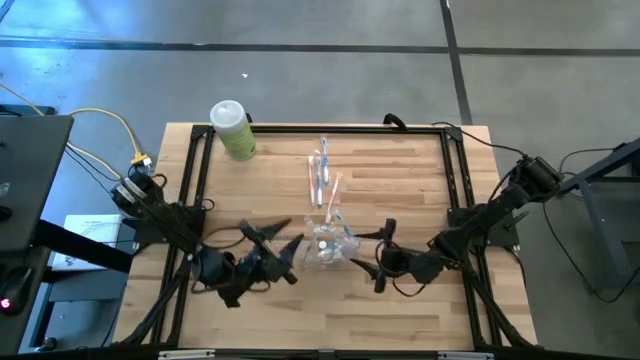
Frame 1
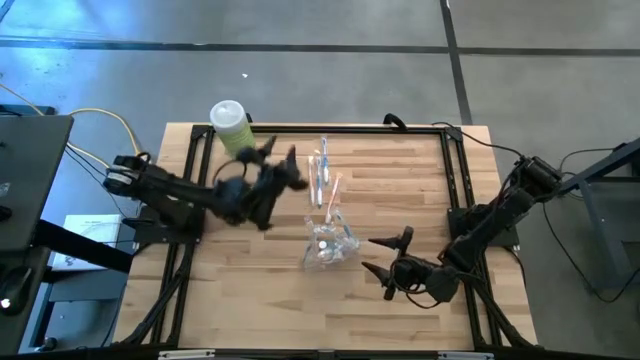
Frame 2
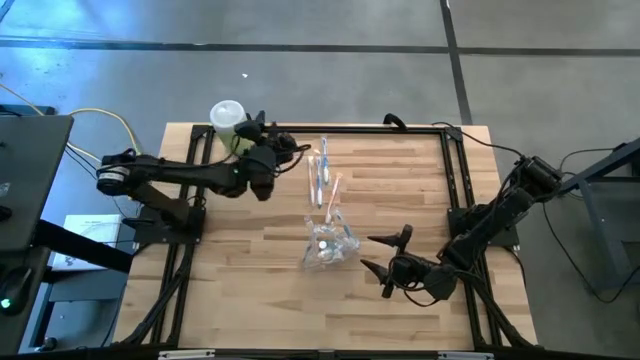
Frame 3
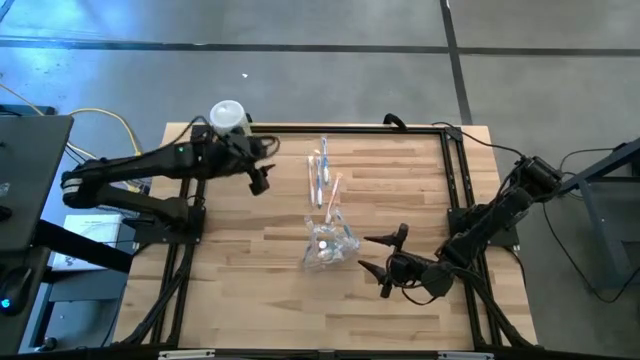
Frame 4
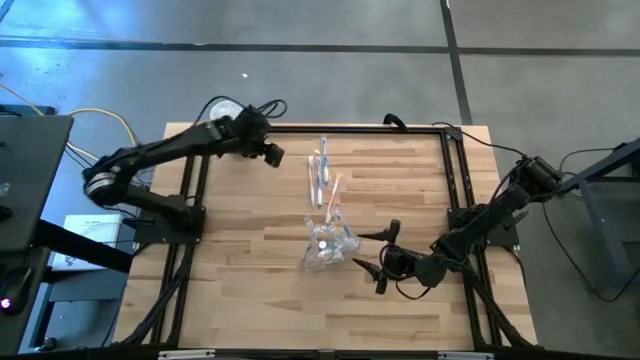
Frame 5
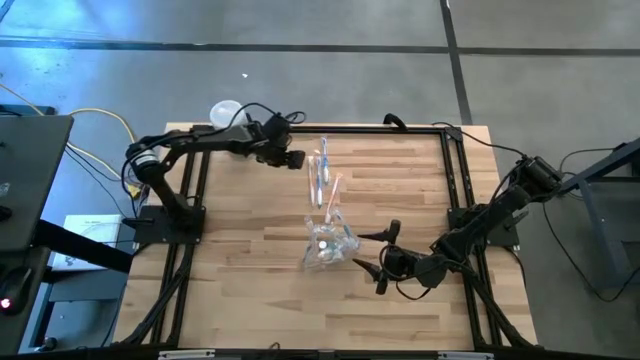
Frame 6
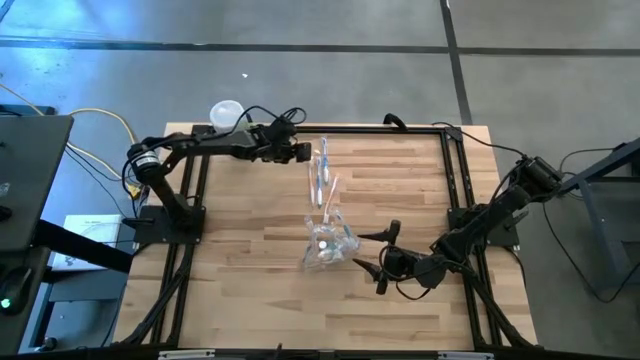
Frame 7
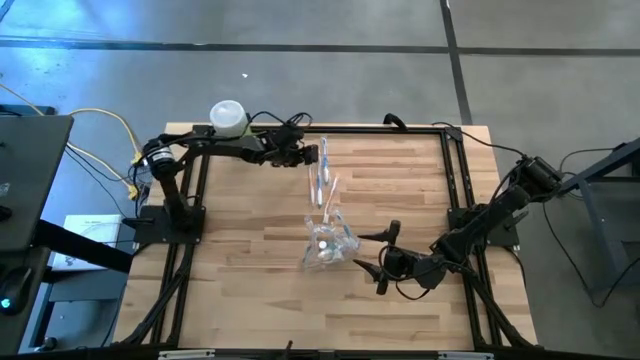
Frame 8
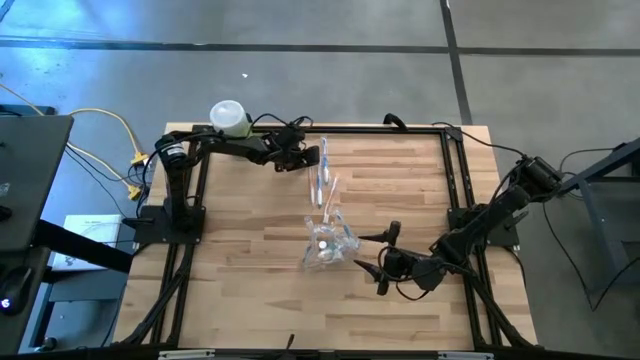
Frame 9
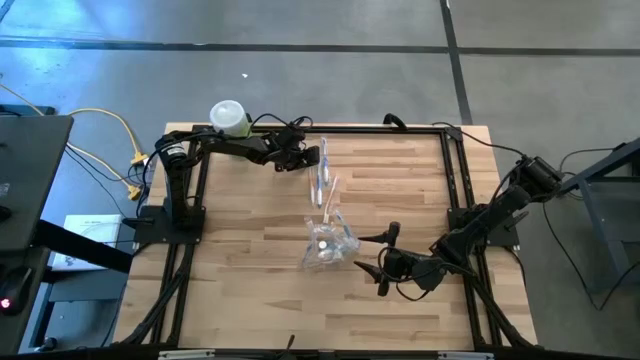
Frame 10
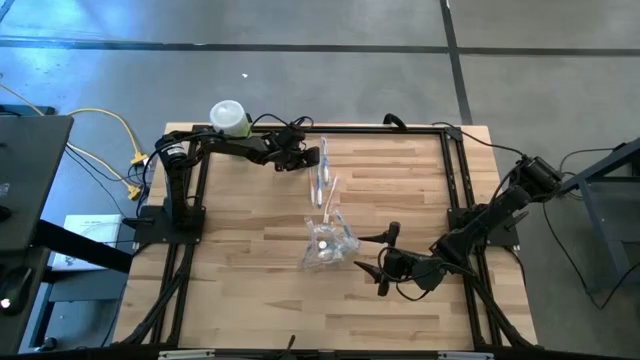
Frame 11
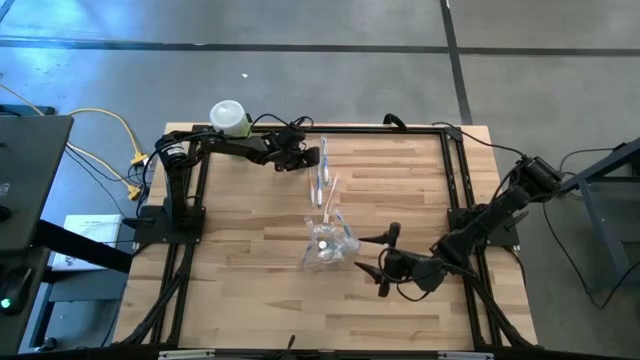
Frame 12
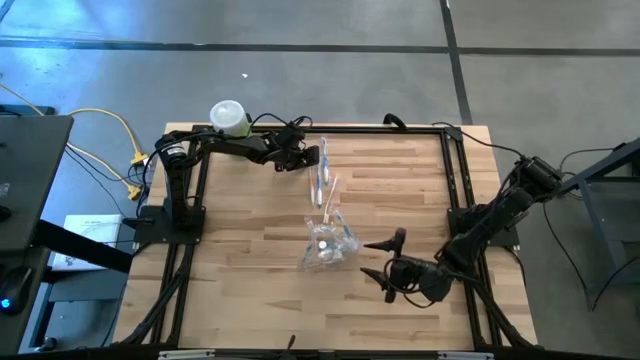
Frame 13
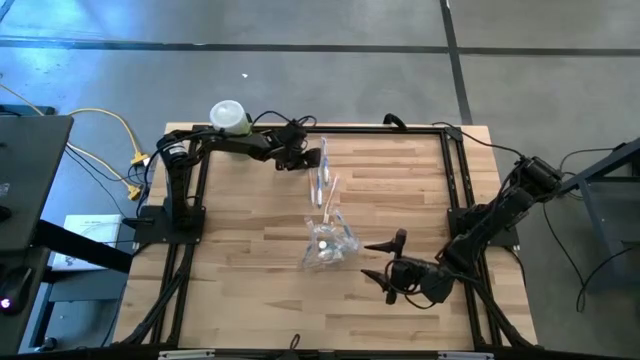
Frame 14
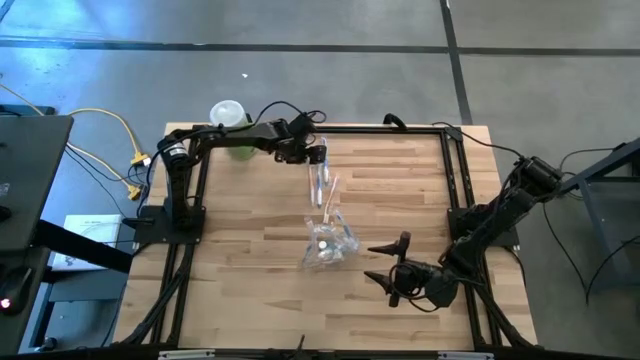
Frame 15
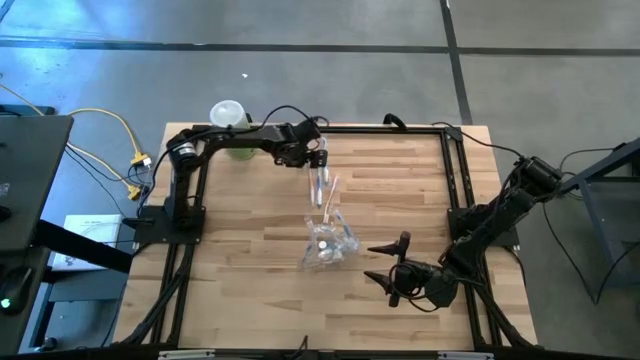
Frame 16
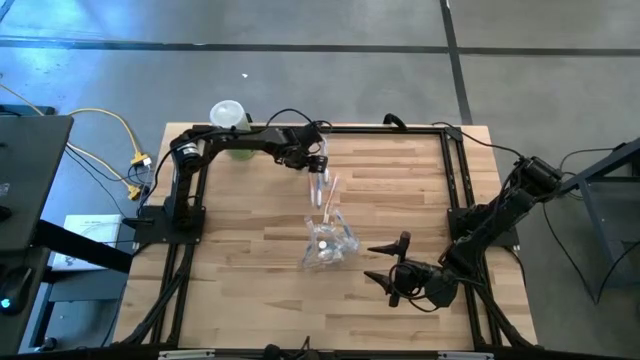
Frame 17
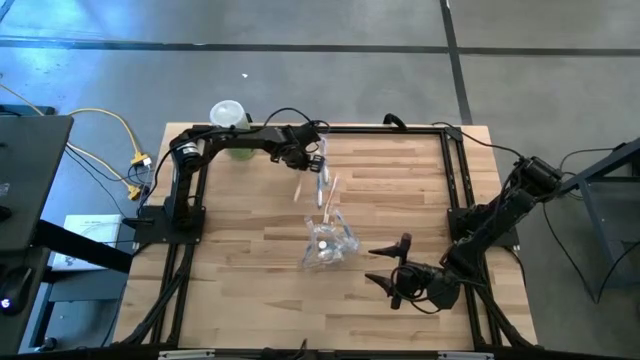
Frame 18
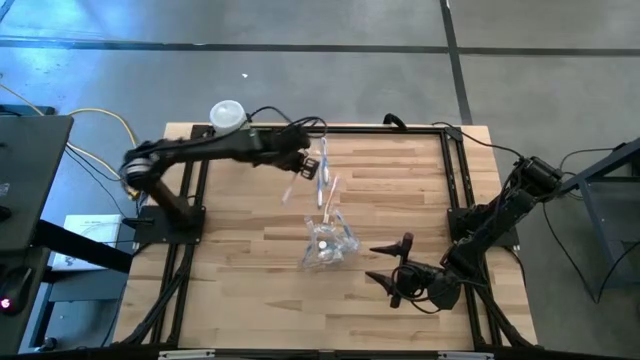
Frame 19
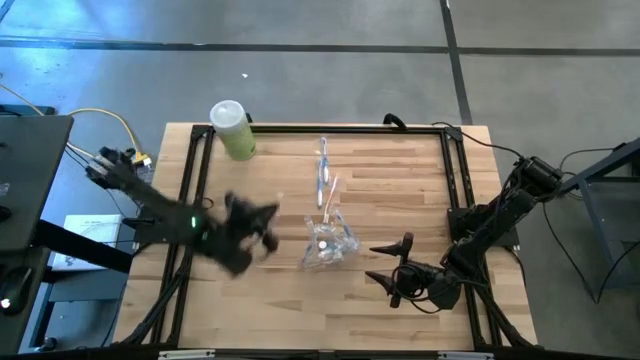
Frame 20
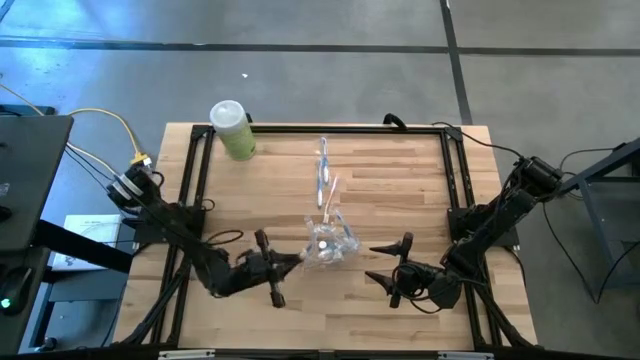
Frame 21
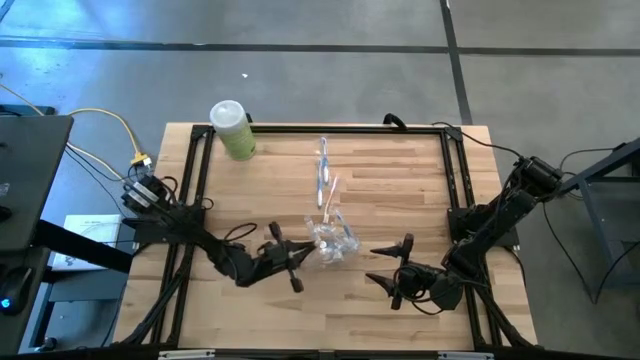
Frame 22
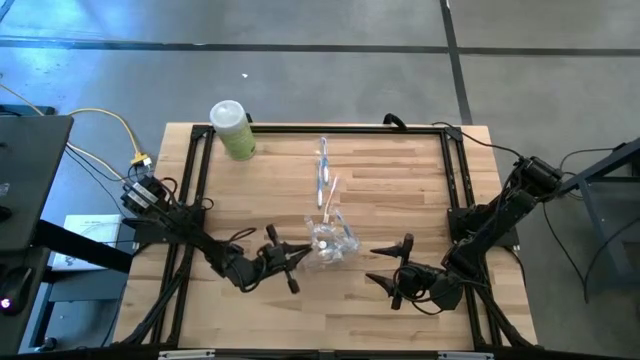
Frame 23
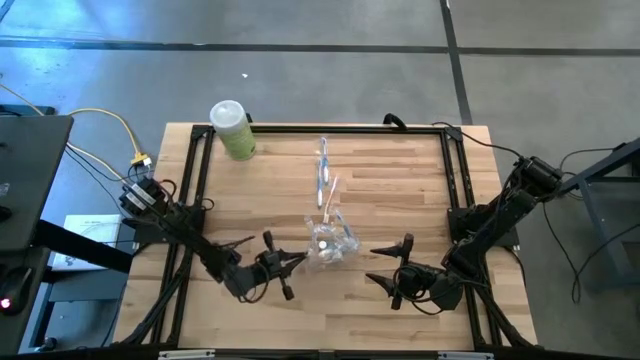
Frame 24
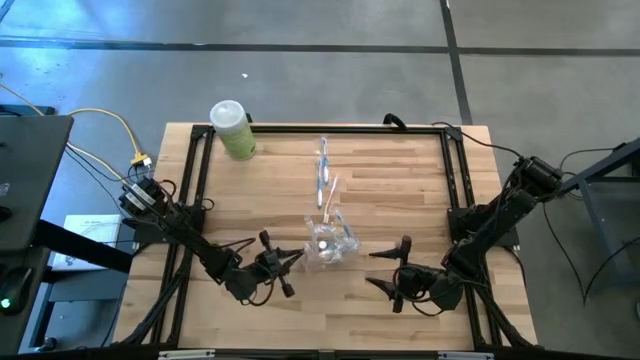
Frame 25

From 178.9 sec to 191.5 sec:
Task: Pick & Place toothbrushing station
Put the orange toothbrush into the transparent organizer

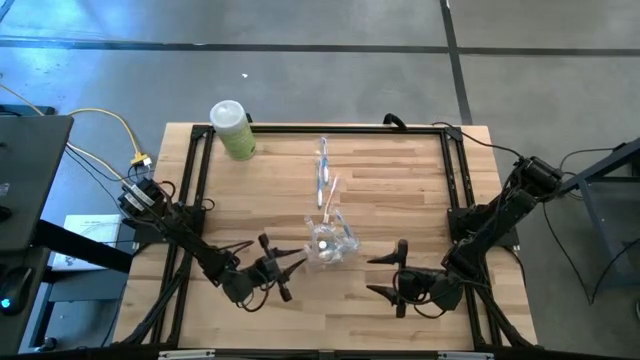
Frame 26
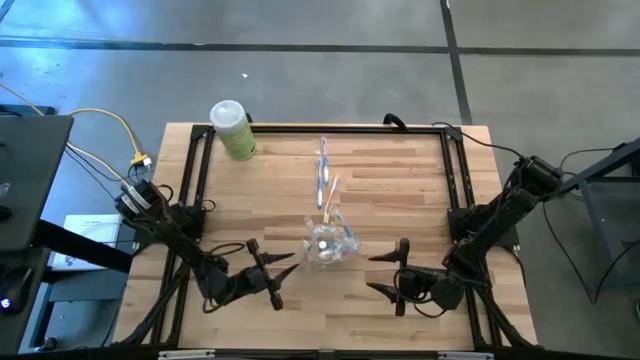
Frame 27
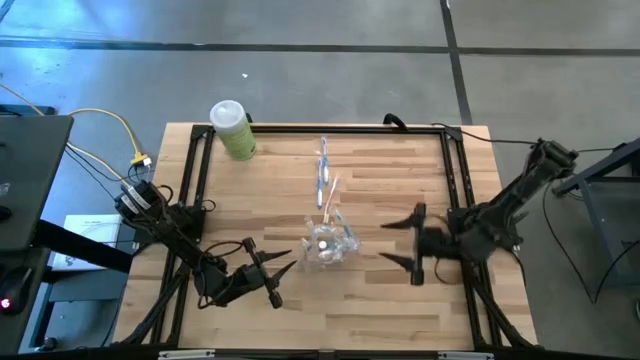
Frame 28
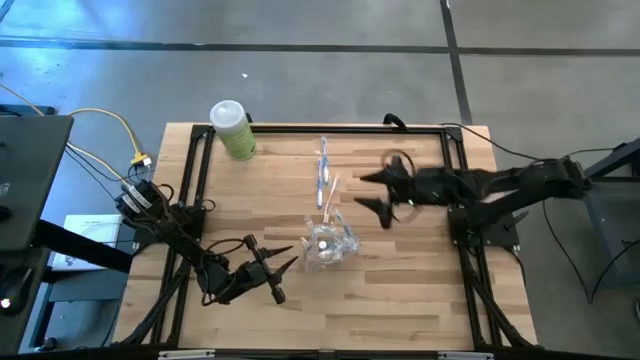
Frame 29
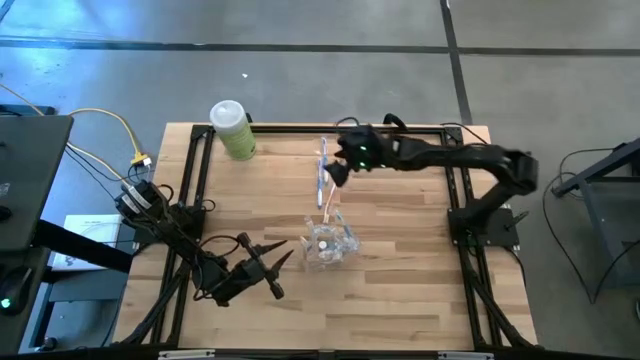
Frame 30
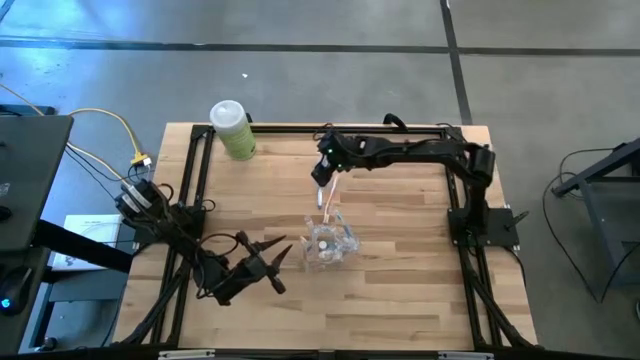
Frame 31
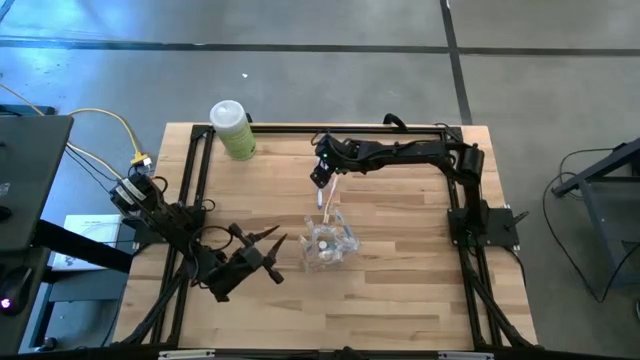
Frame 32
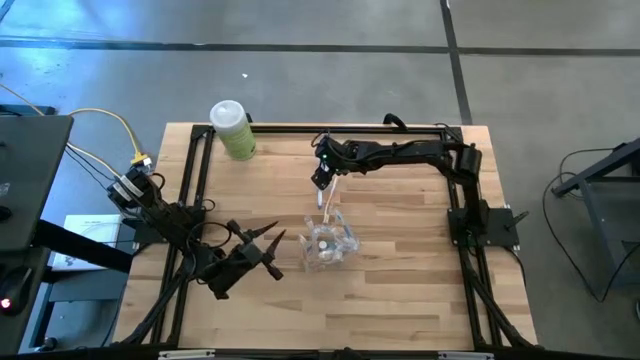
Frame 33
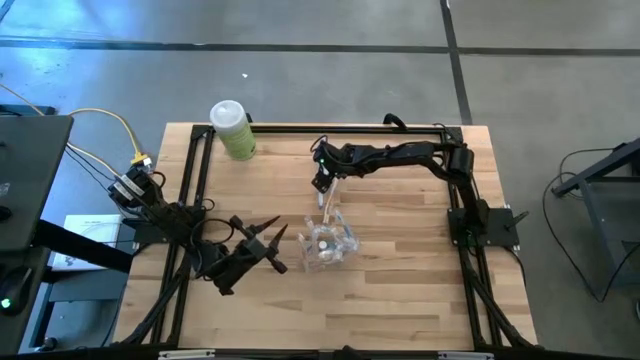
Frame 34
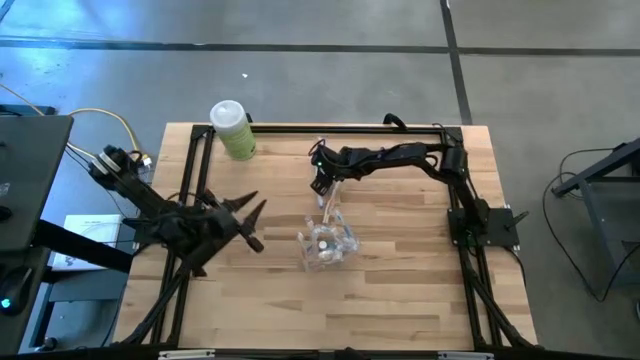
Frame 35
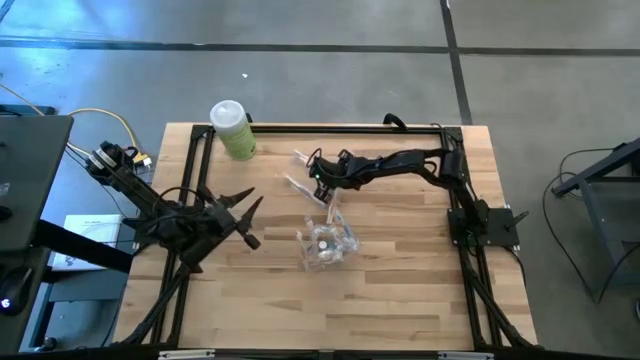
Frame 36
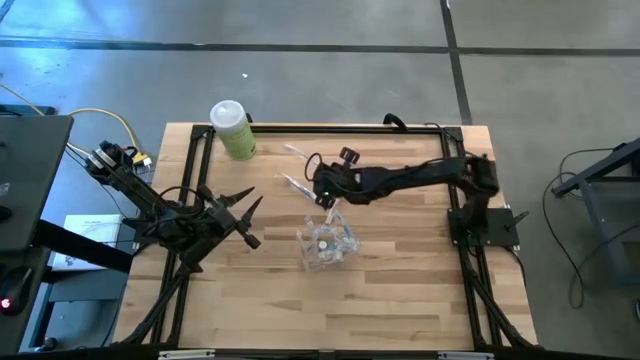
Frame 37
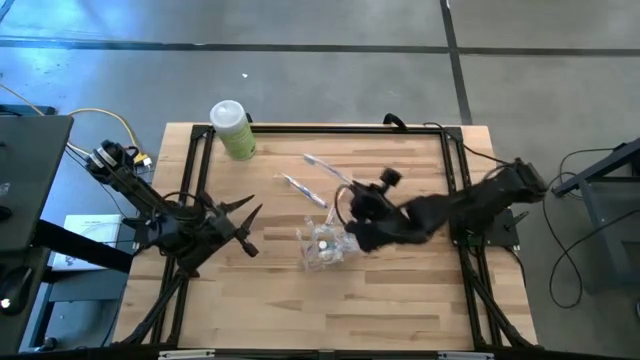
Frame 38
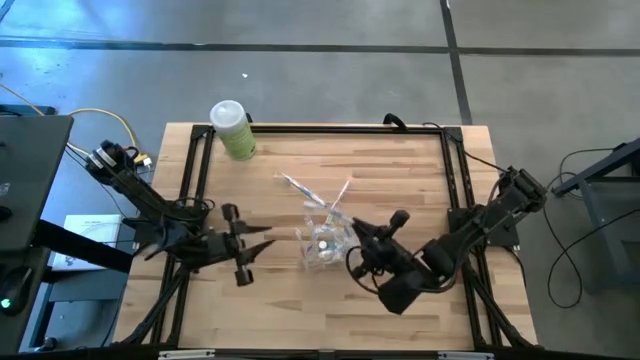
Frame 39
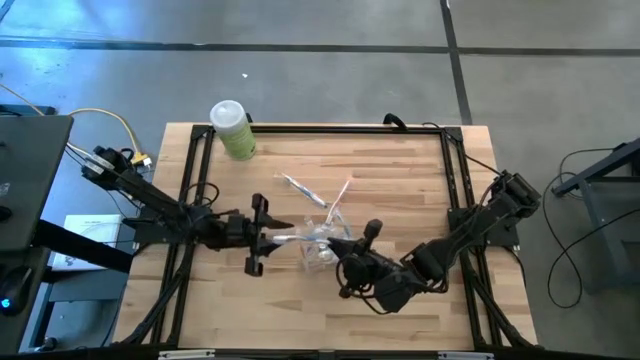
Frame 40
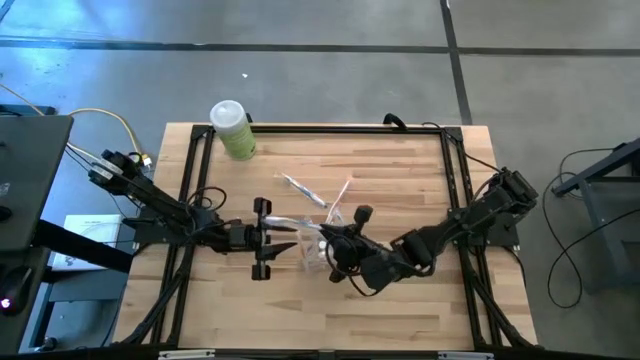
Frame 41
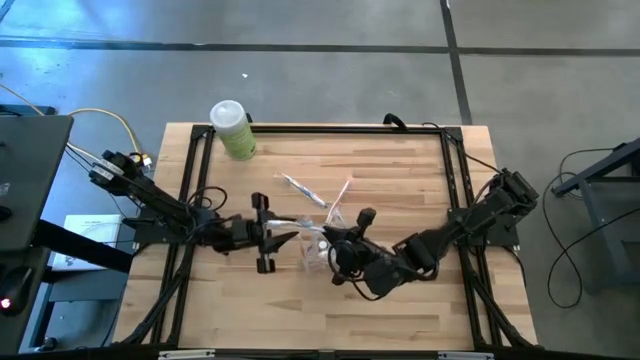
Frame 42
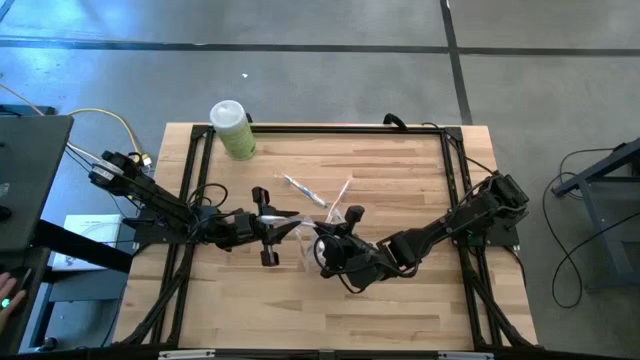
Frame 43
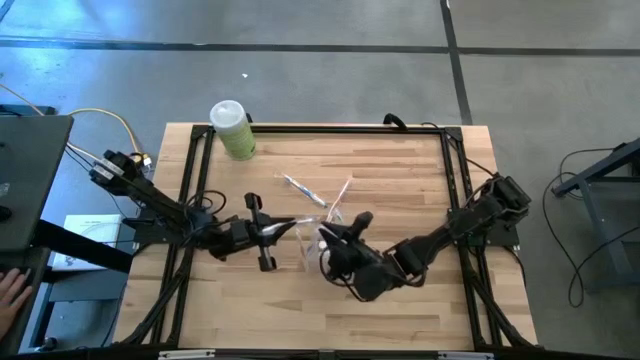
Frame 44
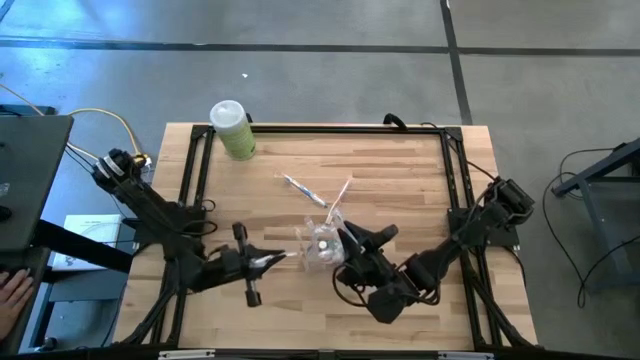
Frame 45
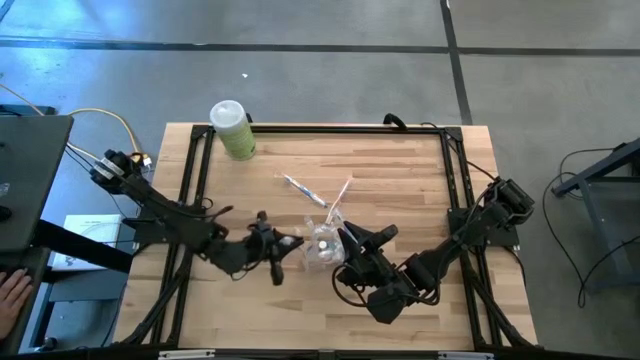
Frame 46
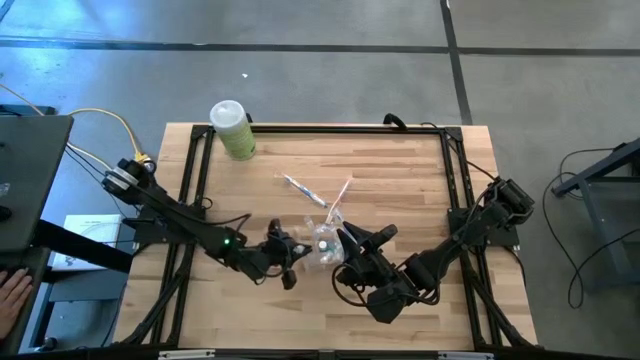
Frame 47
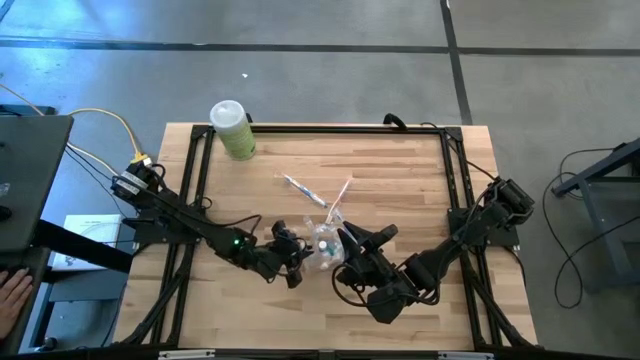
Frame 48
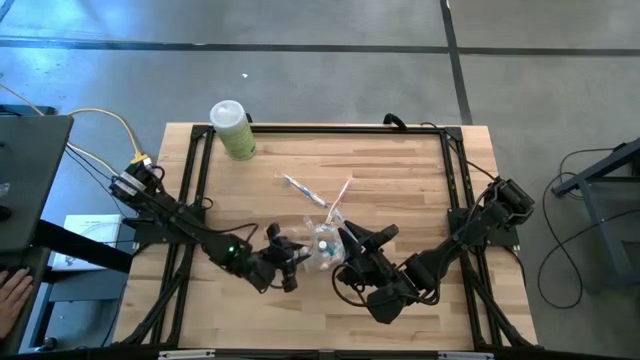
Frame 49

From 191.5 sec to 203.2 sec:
Put the blue toothbrush into the transparent organizer
